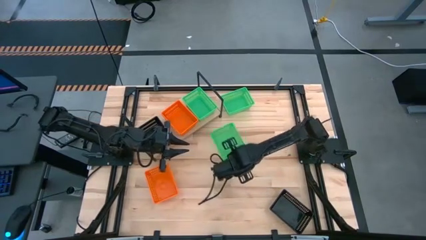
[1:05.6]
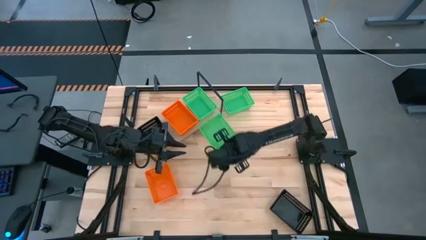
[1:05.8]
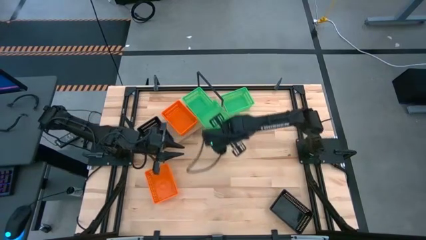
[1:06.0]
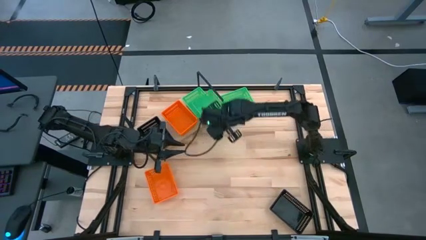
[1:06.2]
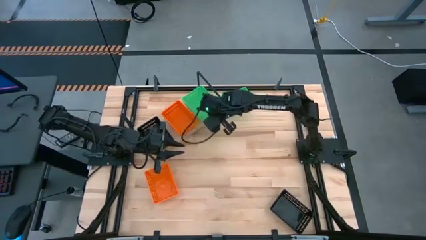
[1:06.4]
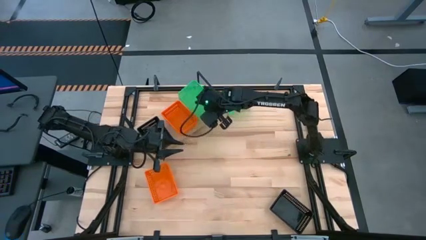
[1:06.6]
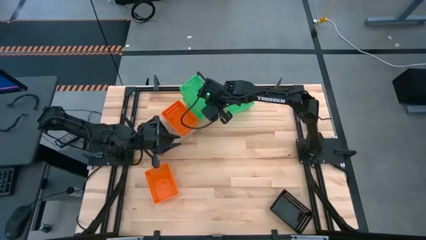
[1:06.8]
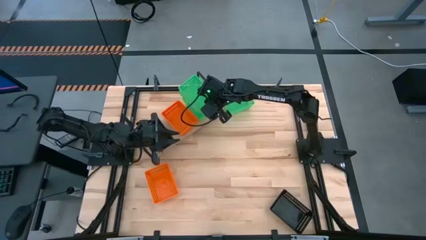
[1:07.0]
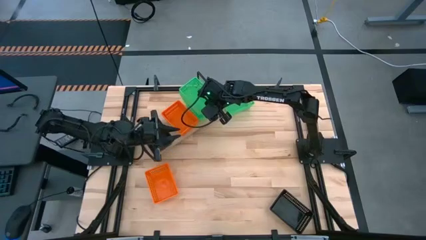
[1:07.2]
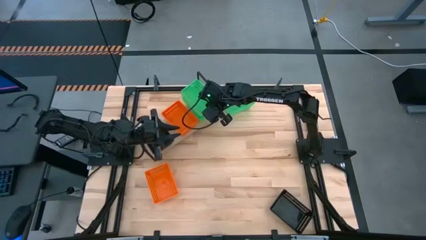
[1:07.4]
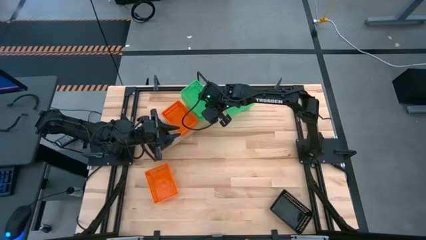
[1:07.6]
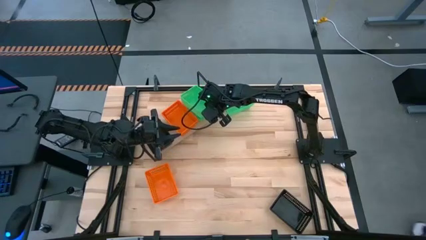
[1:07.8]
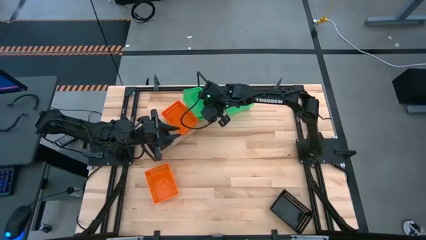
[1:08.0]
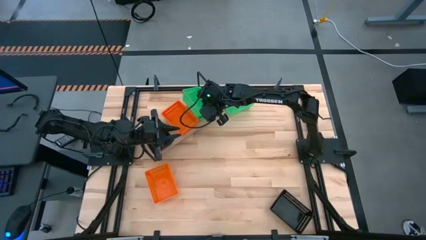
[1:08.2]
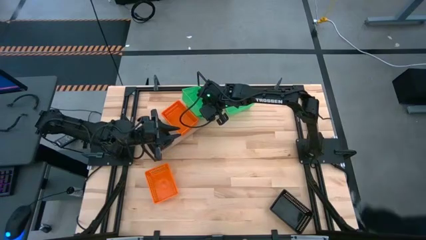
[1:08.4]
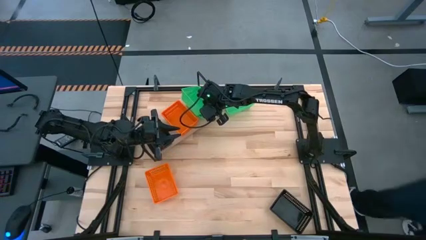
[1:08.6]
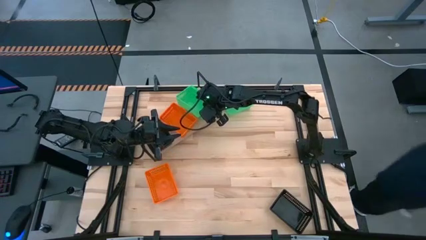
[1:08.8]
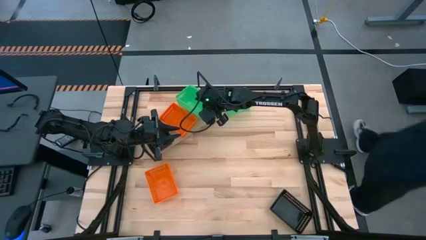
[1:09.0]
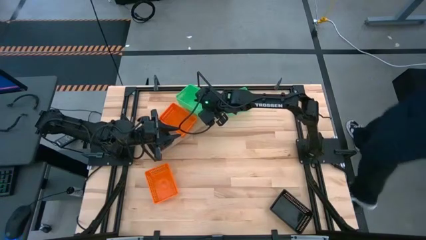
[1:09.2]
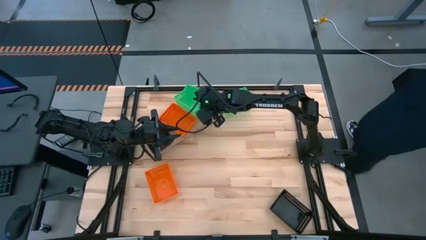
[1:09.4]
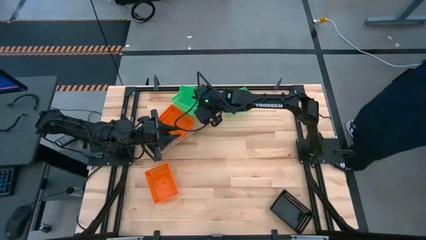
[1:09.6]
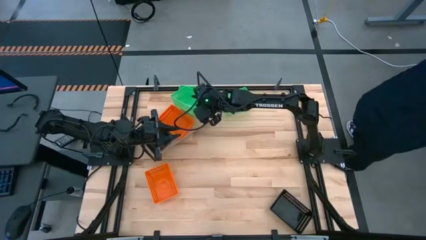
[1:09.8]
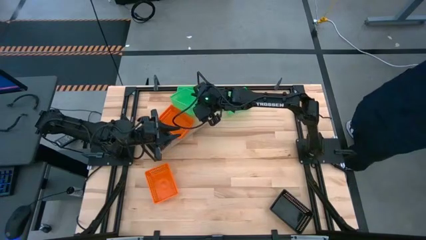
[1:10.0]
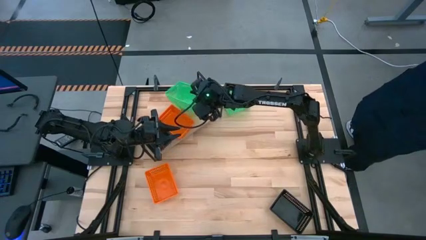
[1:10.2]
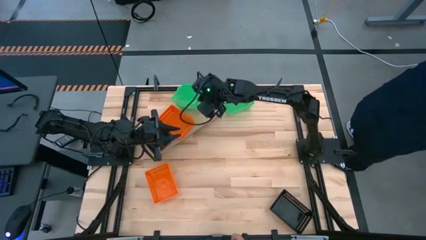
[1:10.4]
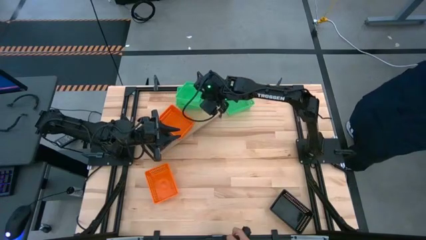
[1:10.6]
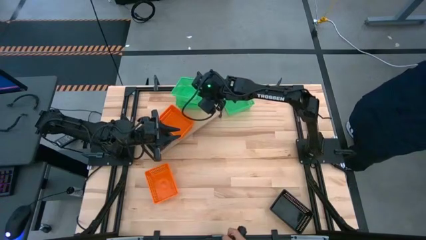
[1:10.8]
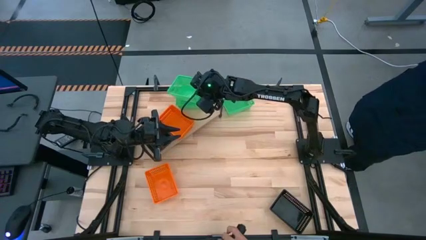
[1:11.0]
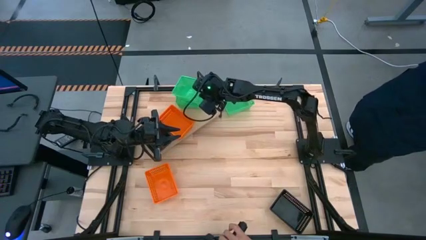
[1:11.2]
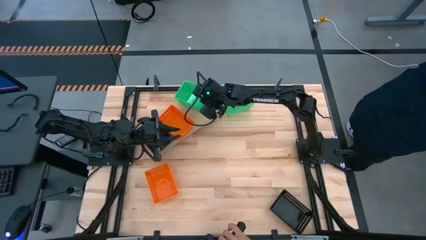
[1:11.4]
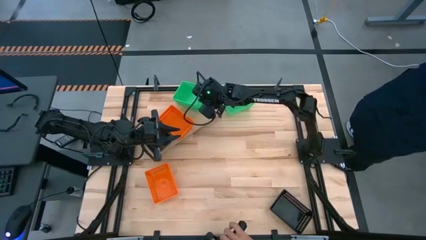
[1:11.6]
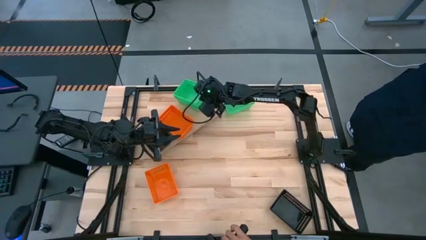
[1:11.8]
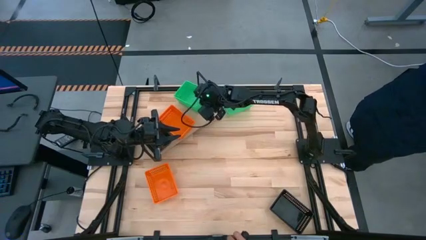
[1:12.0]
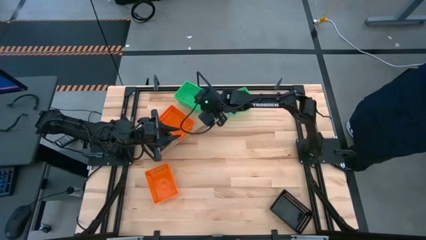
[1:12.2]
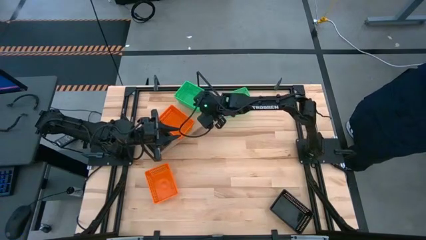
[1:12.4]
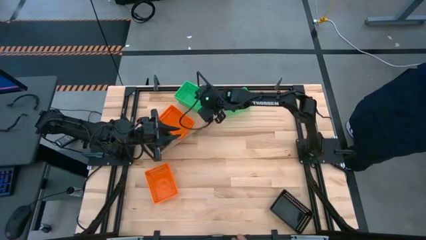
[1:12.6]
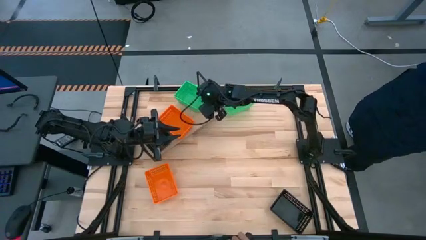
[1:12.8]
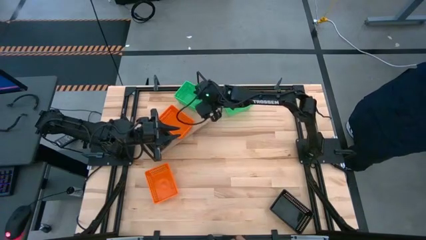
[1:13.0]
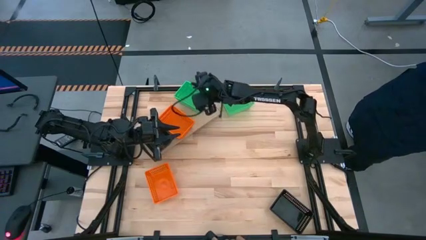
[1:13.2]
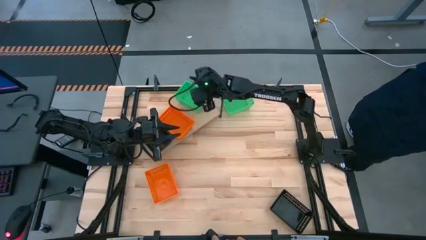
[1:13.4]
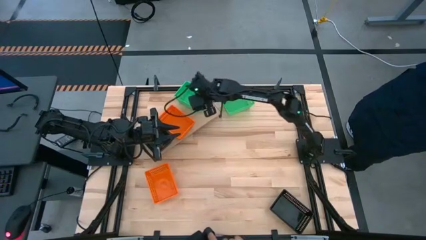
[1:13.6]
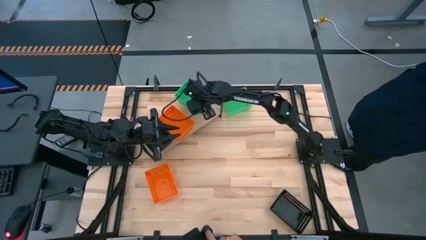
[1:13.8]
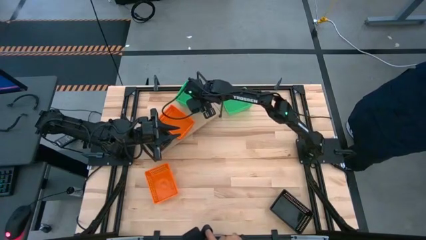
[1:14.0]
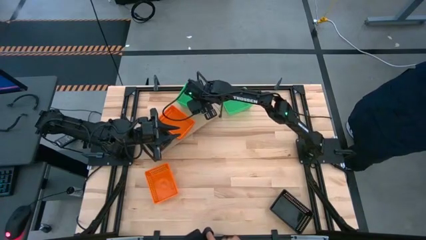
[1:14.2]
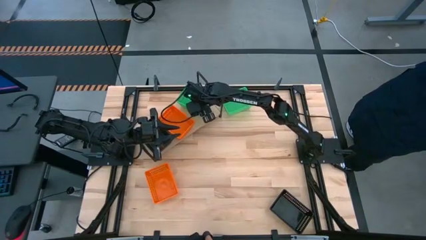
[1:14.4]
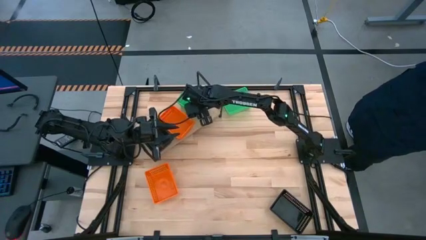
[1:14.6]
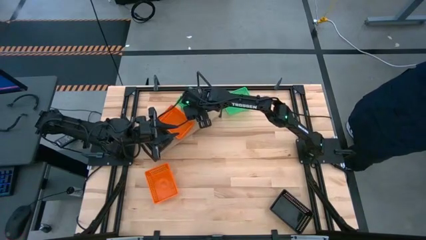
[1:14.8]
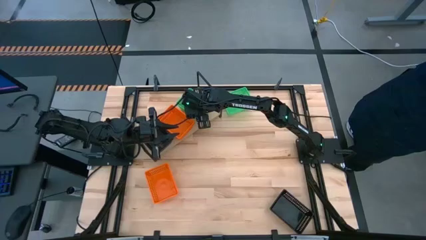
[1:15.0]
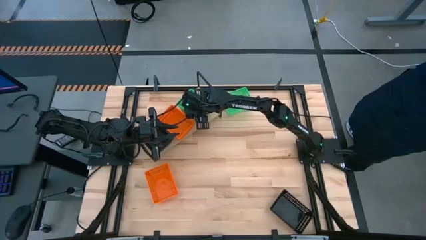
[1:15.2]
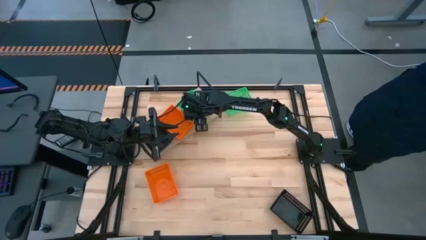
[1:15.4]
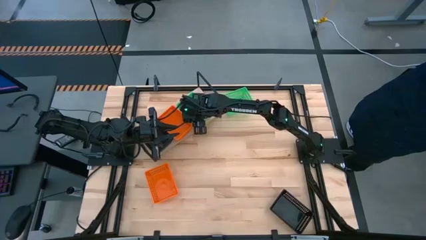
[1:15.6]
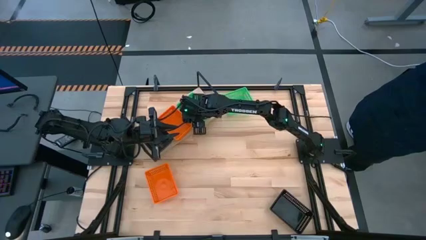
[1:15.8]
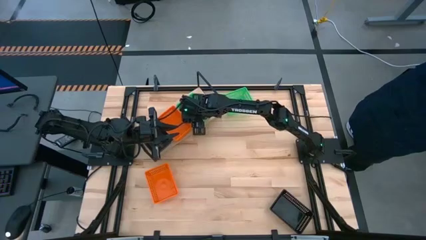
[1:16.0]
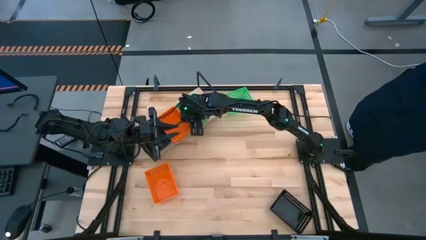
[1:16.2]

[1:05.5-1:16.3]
Task: Stack baskets on shelf by color
Stack the bottom green bin on top of the green bin on the shelf

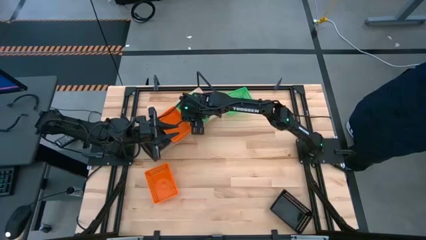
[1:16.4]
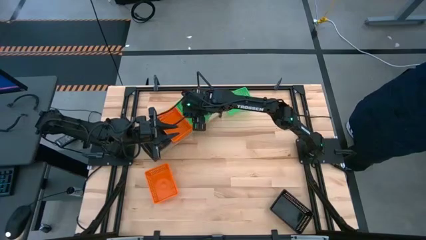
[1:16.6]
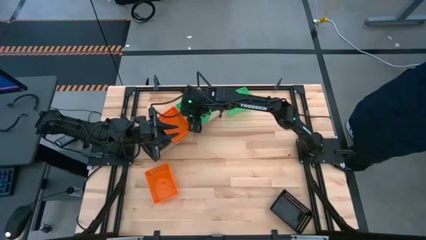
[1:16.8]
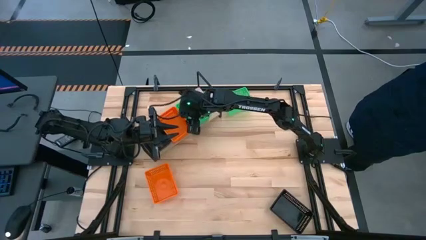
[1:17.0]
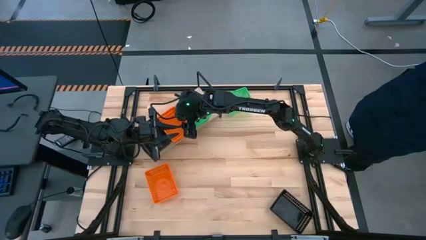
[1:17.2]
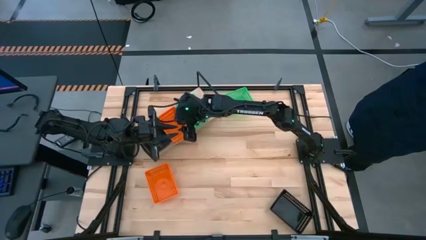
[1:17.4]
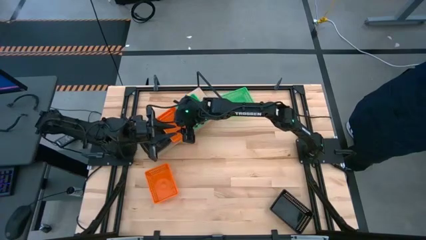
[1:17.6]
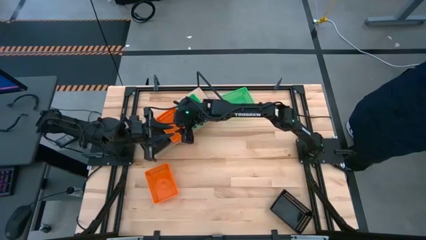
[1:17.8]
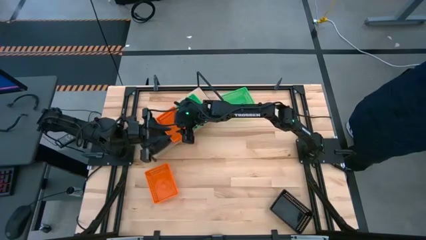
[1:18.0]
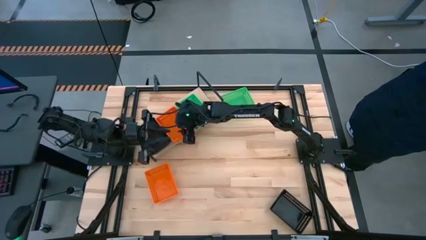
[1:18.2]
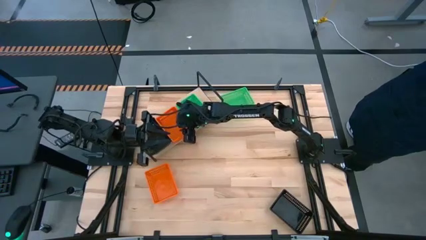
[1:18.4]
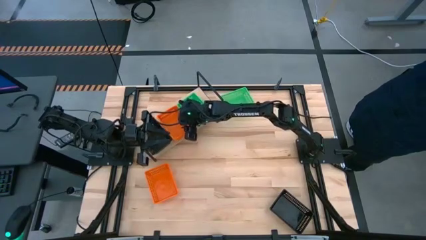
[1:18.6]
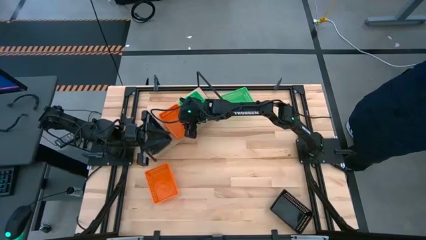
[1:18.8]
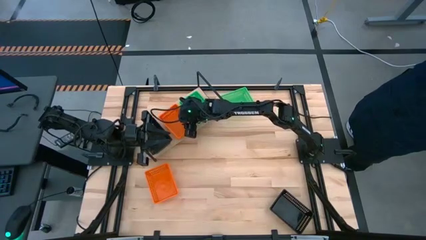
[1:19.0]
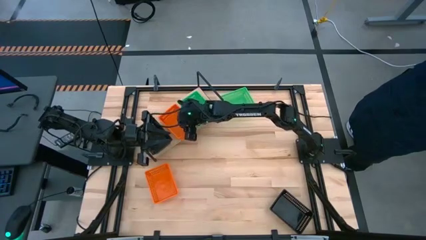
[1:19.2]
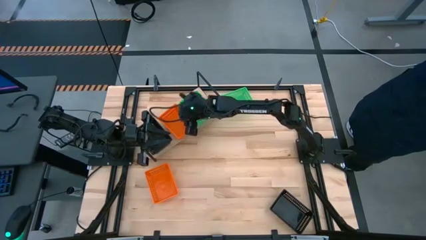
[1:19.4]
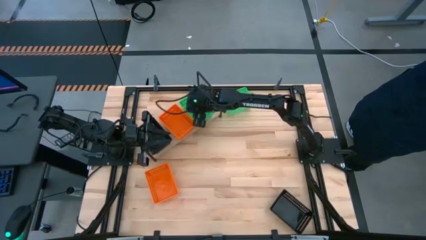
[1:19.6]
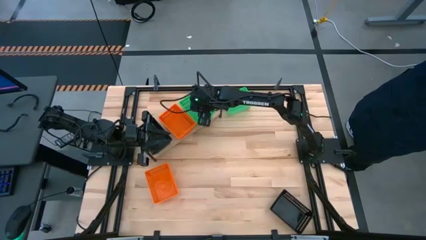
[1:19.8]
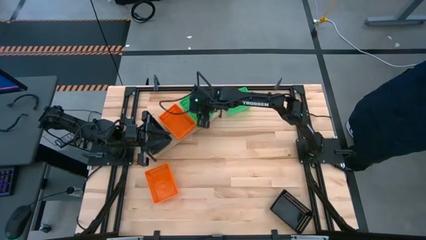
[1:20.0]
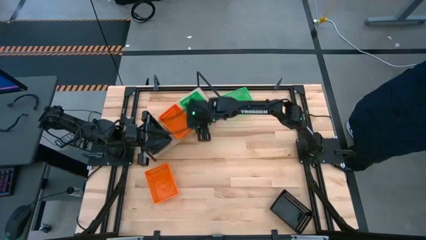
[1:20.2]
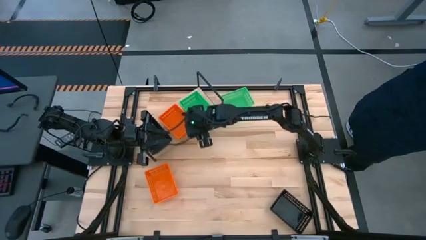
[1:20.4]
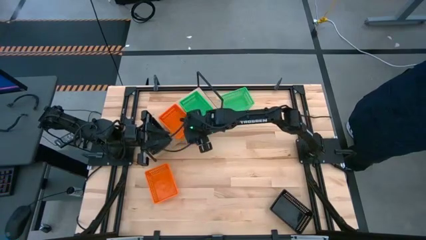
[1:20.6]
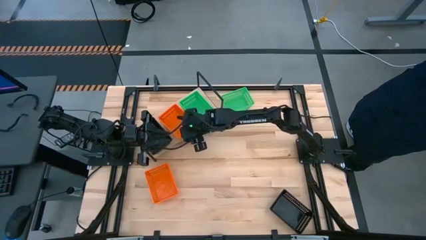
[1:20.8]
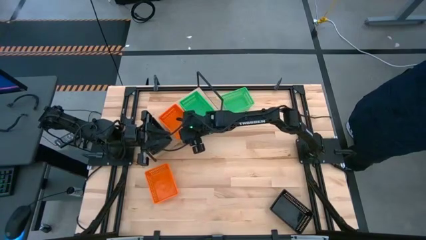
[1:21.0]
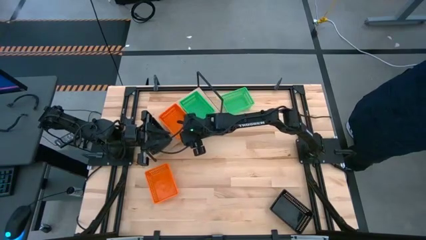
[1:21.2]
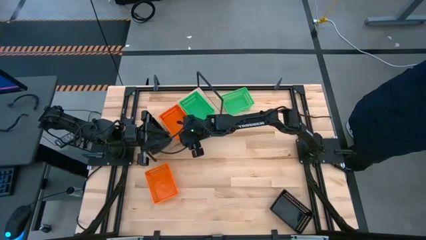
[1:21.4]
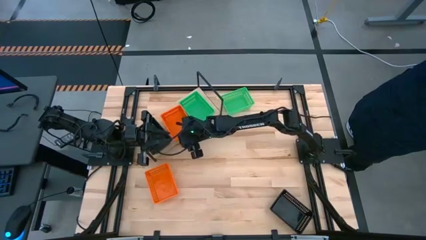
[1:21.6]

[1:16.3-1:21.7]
Adjust the stacked orange bins on the shelf
